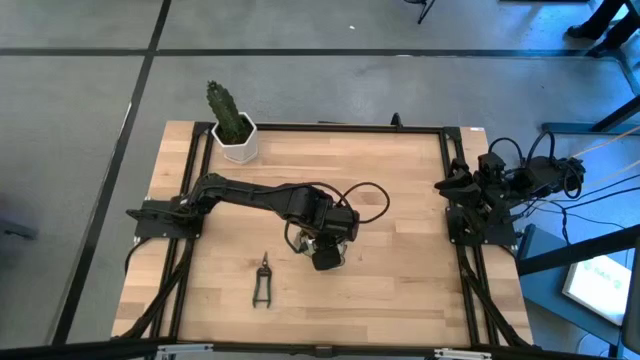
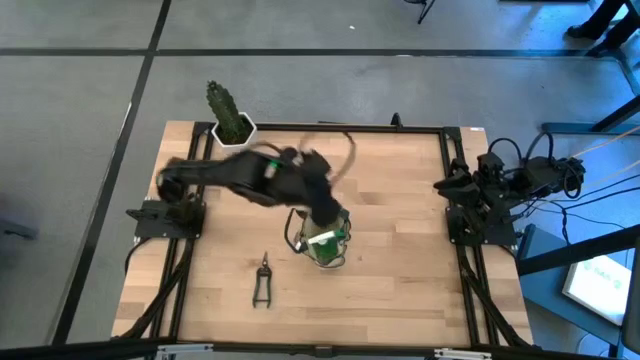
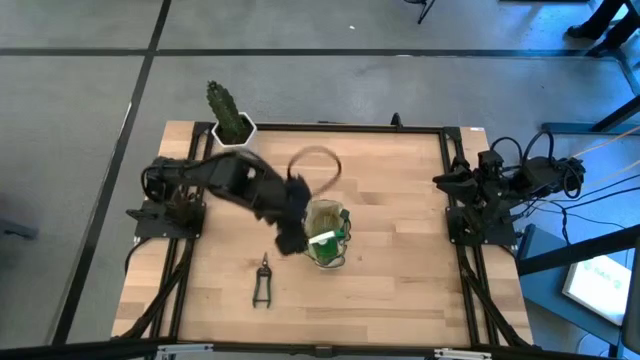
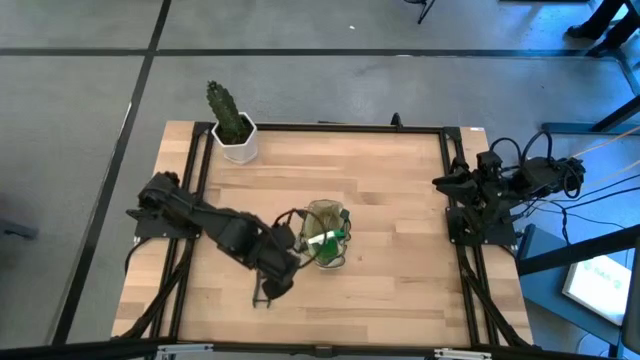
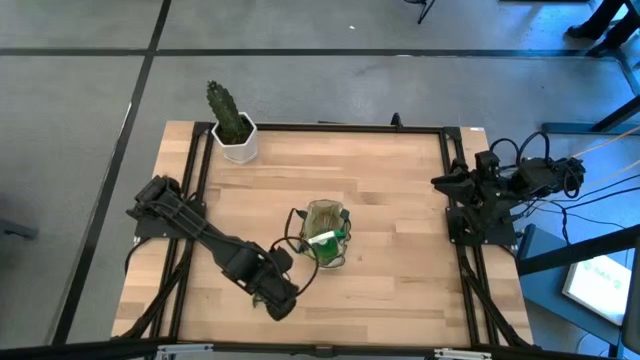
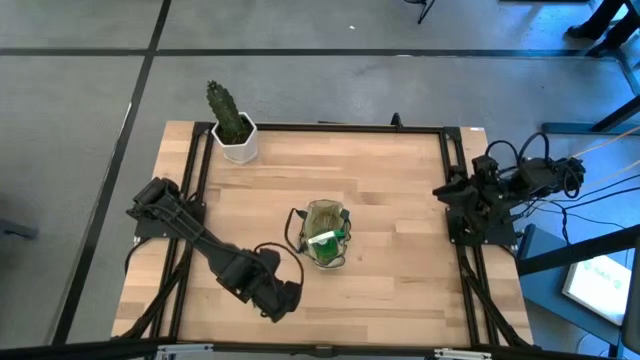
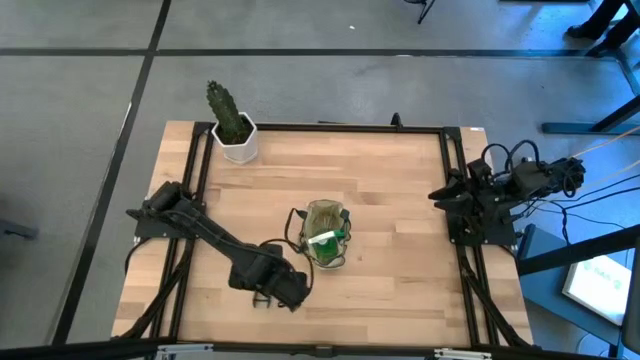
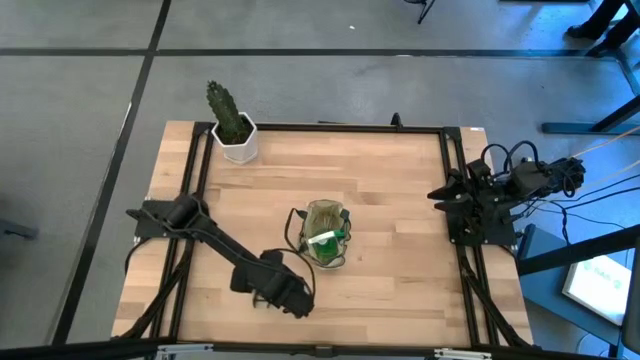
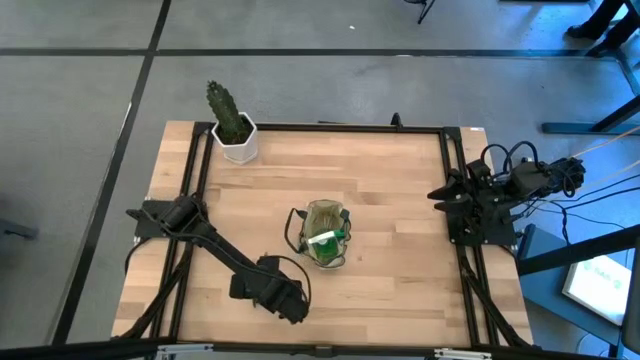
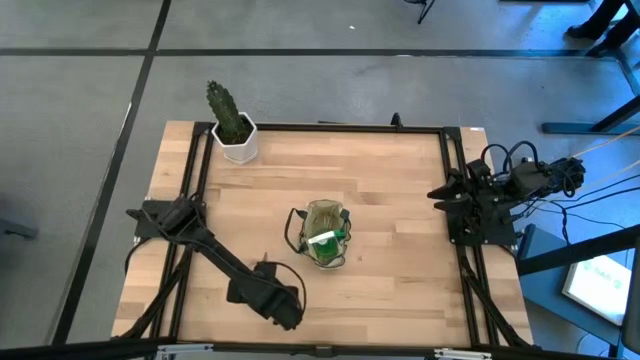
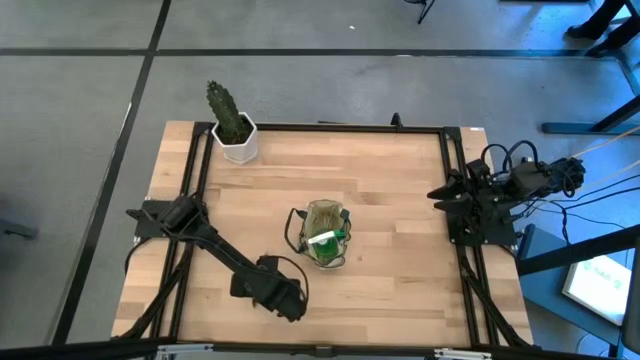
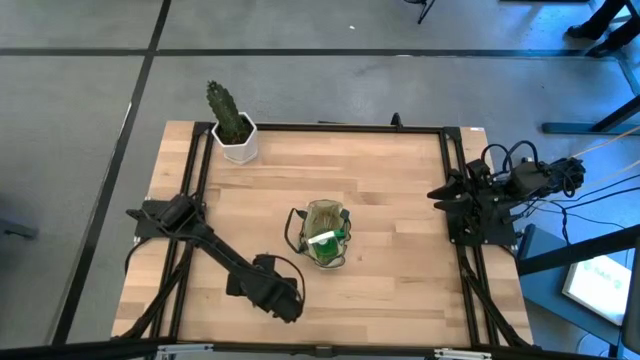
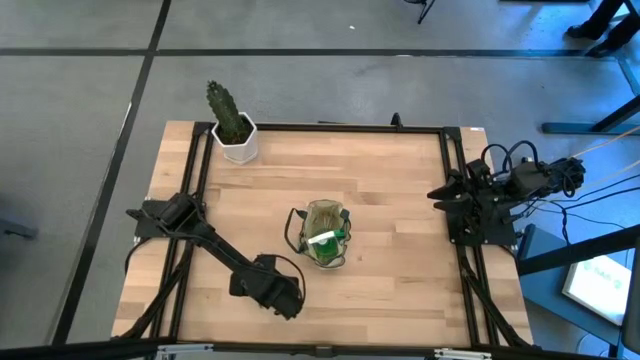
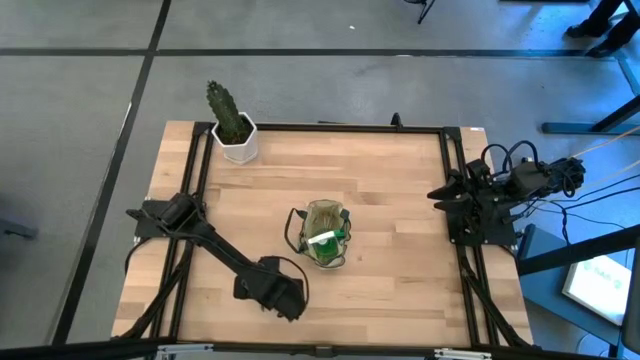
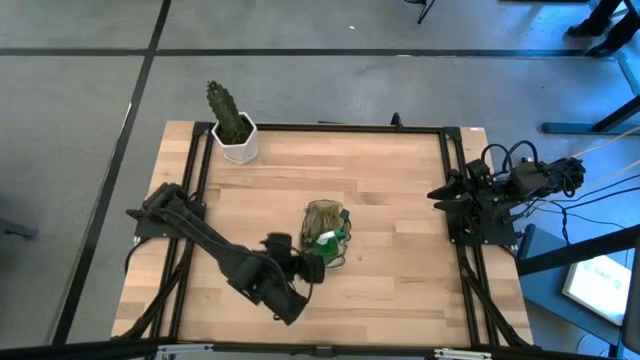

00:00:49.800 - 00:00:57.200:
Task: Pick & Place Garden tools in Gardening bag
Put the green shear scissors into the light brown gardening bag

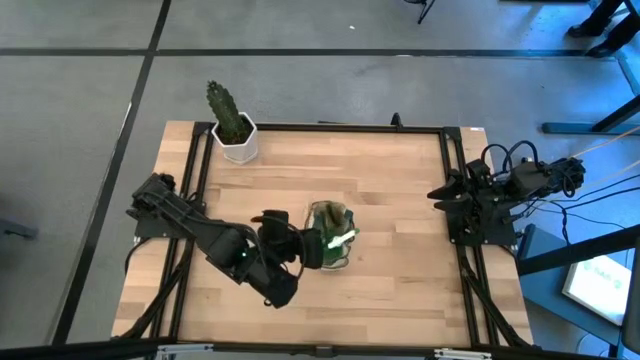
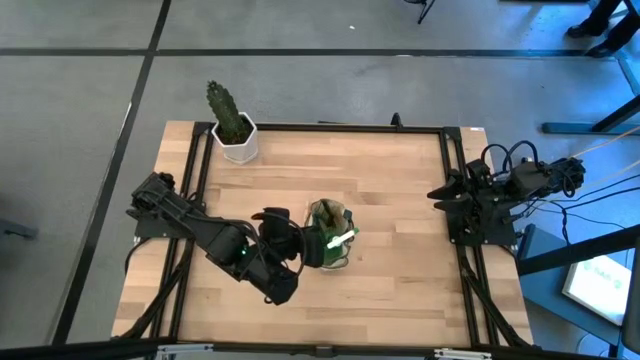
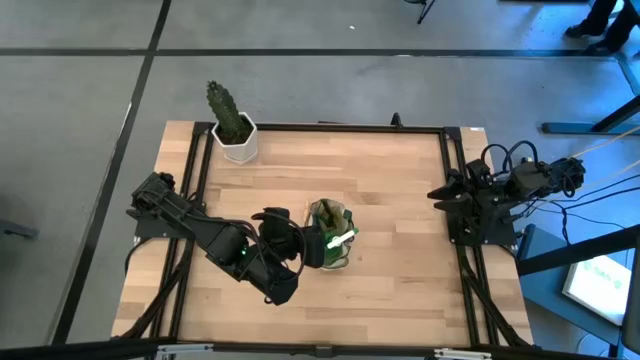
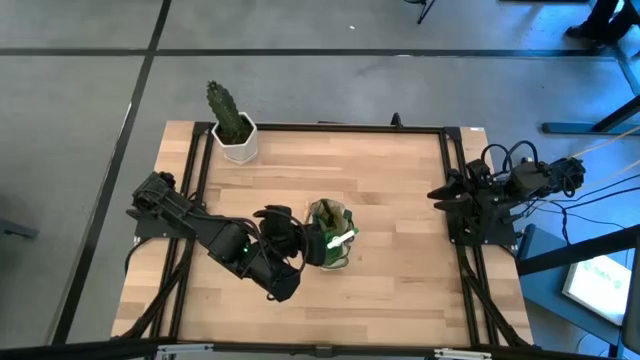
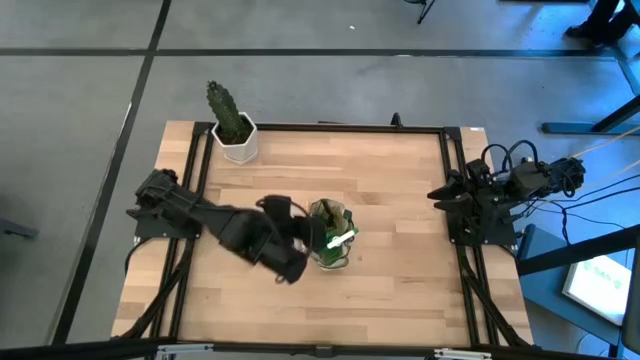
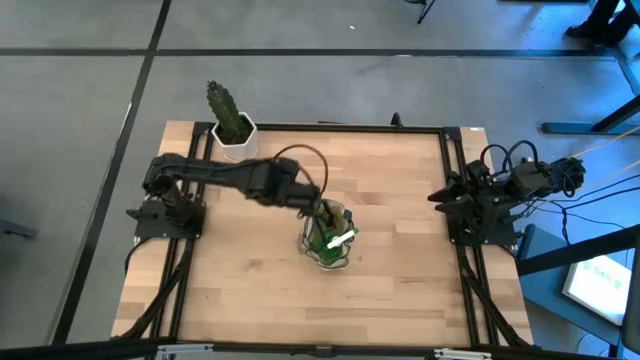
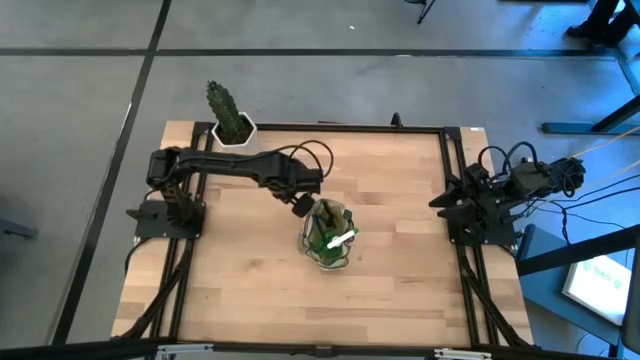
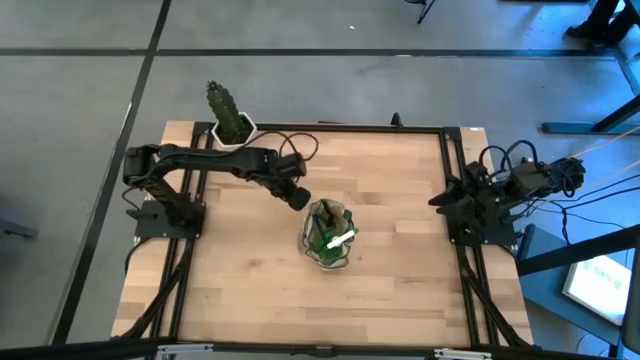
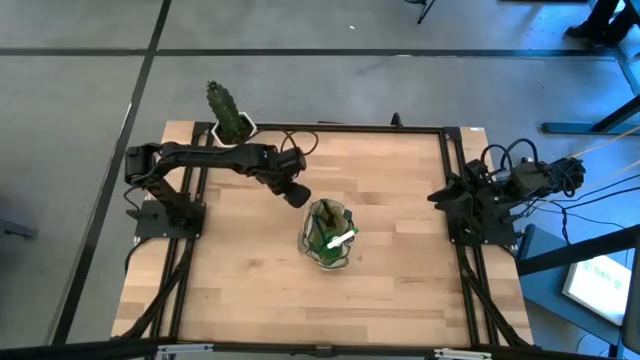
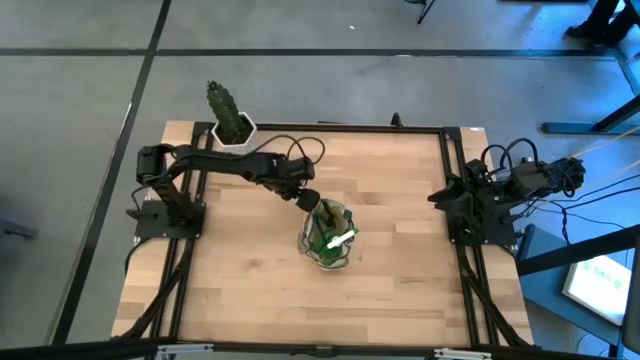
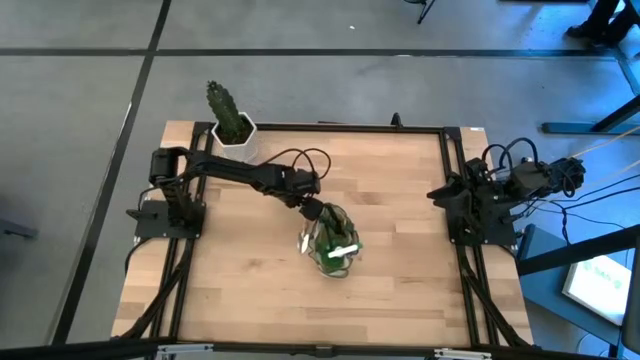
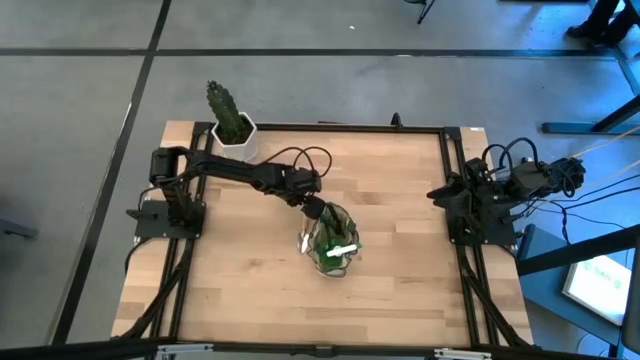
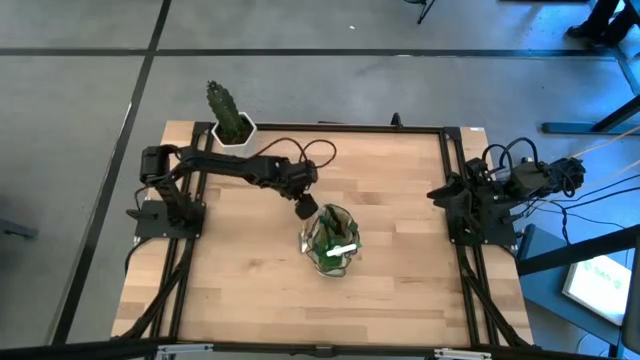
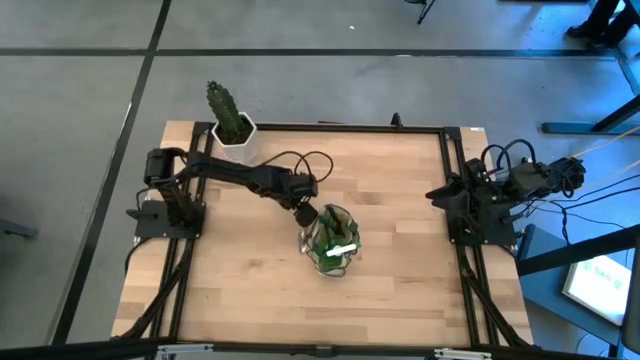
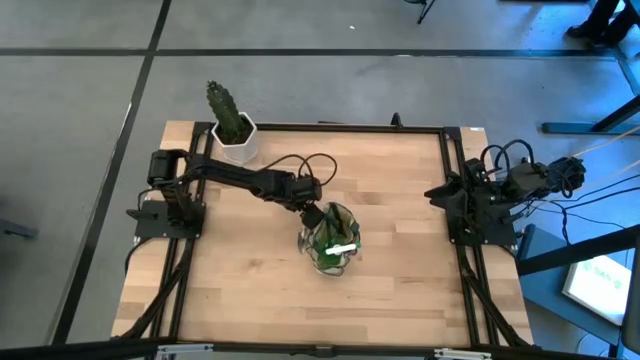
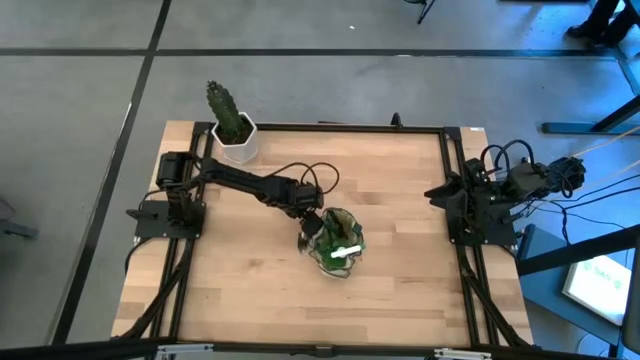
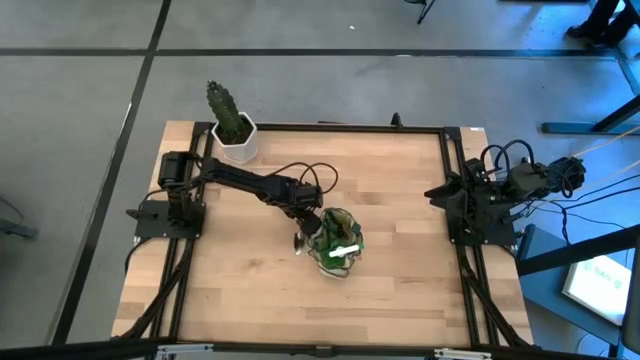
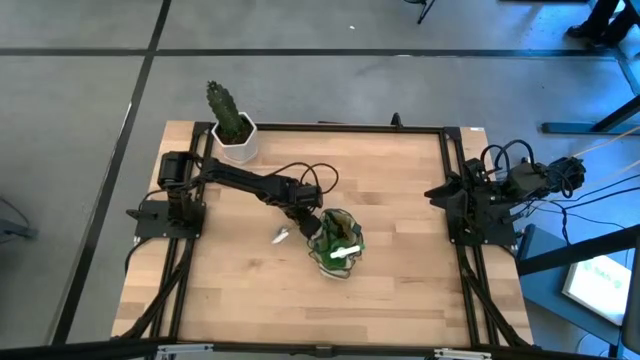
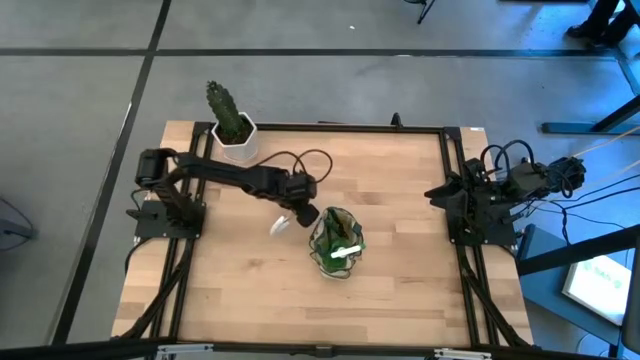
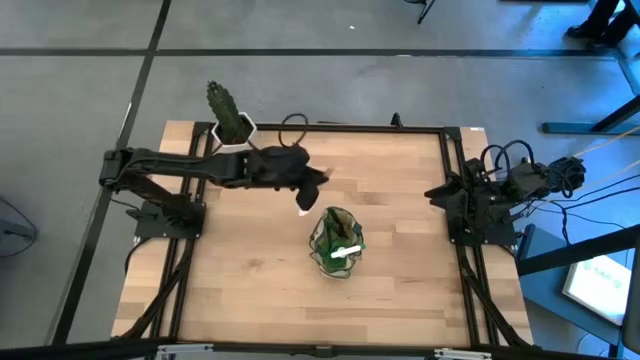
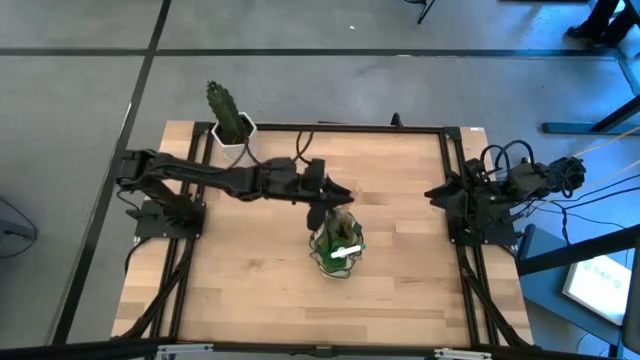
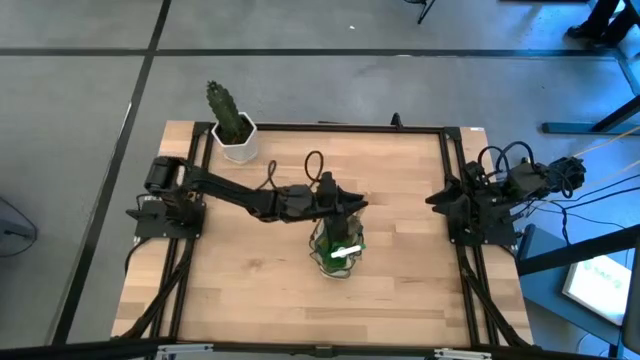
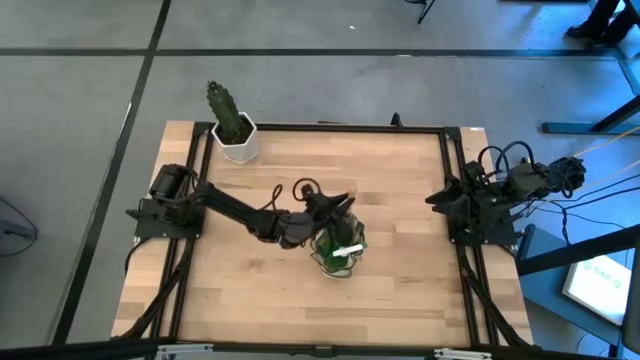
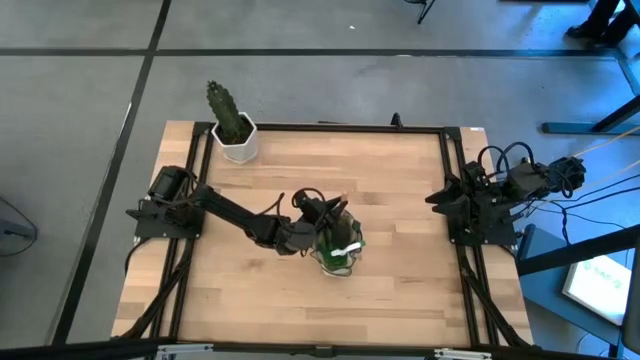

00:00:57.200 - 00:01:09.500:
Put the brown trowel into the light brown gardening bag
